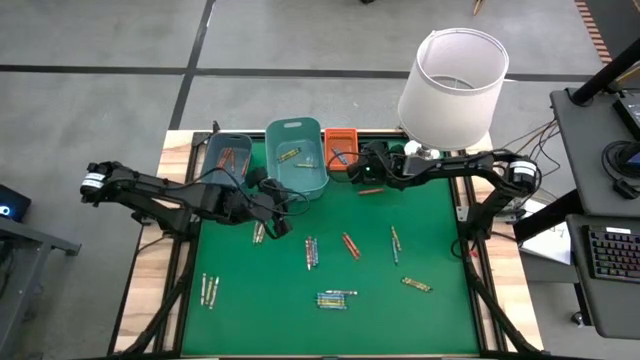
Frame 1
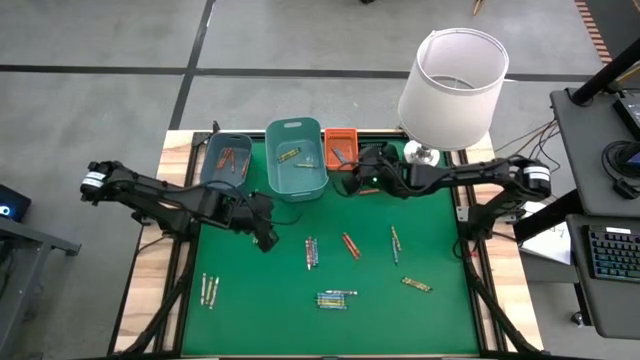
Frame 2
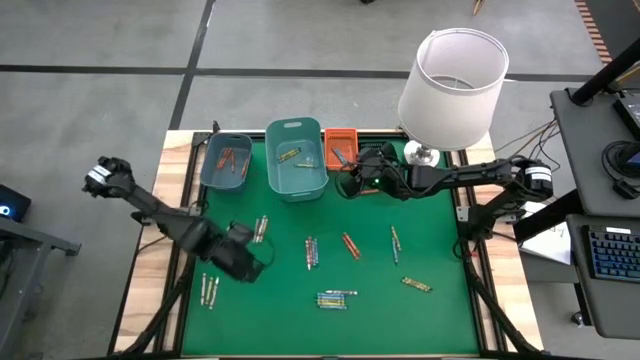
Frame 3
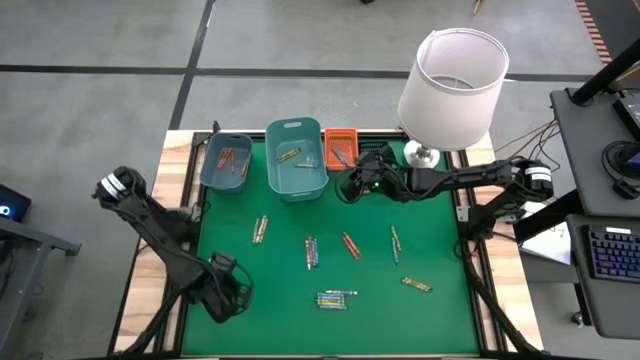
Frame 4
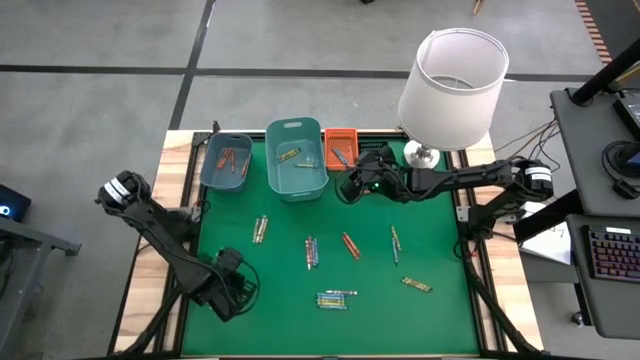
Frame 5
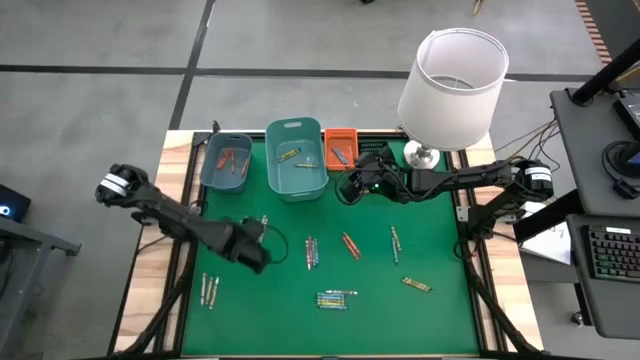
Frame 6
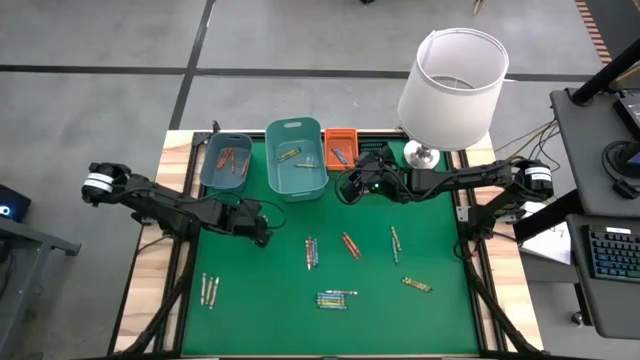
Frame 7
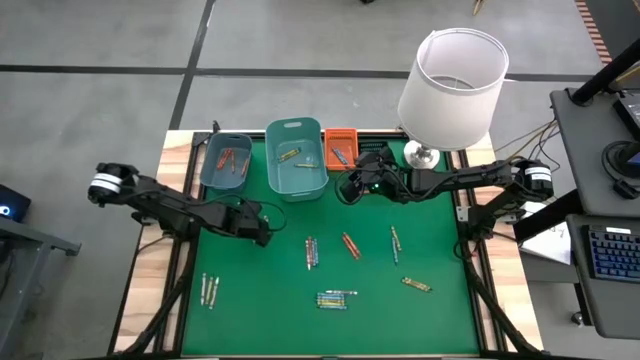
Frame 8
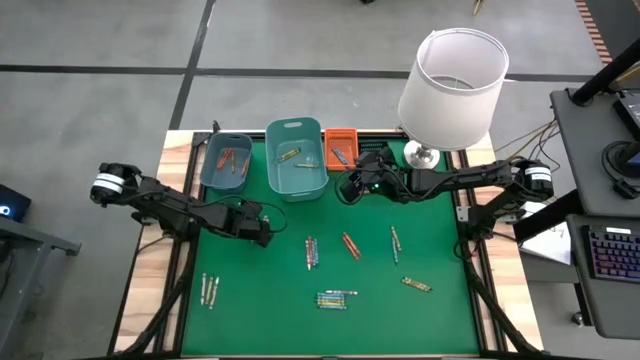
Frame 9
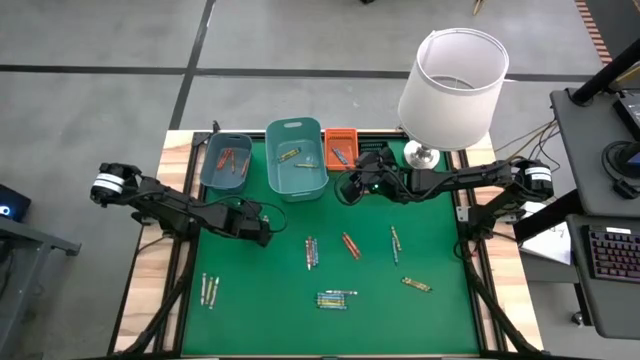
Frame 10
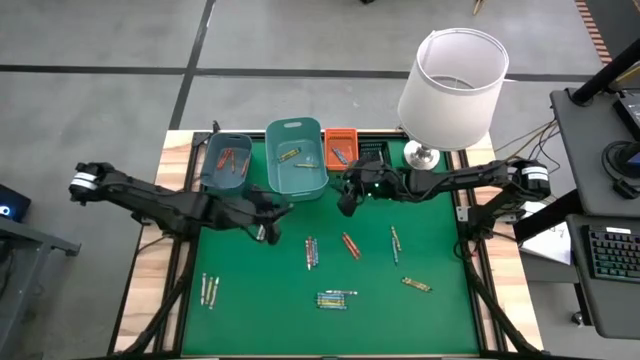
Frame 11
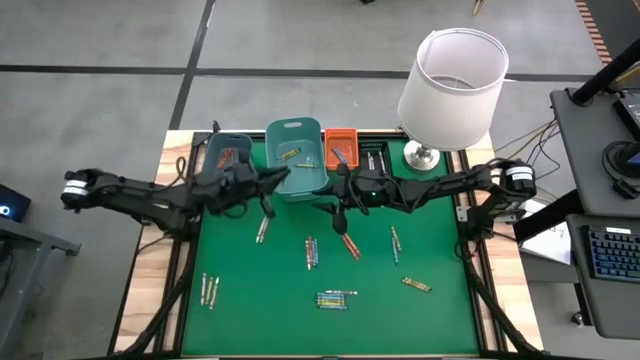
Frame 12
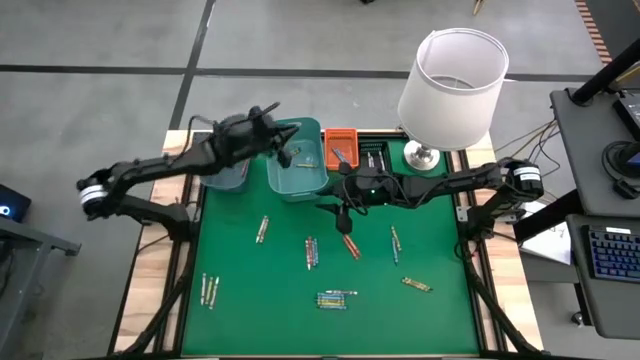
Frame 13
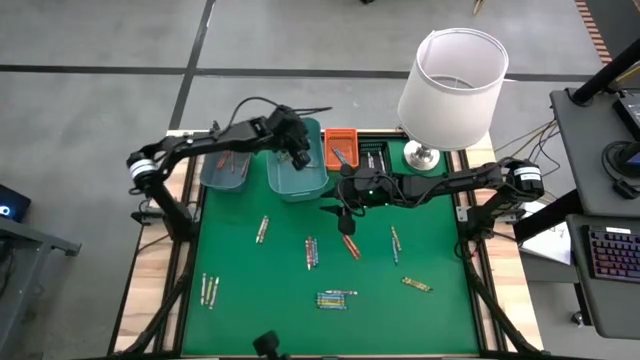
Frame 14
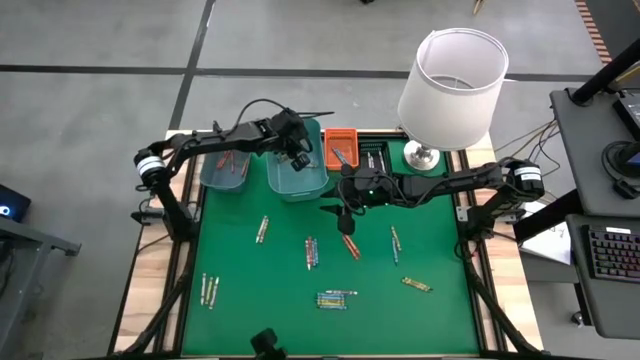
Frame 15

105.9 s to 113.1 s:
Task: Sort crayons
Put the green crayon into the green bin

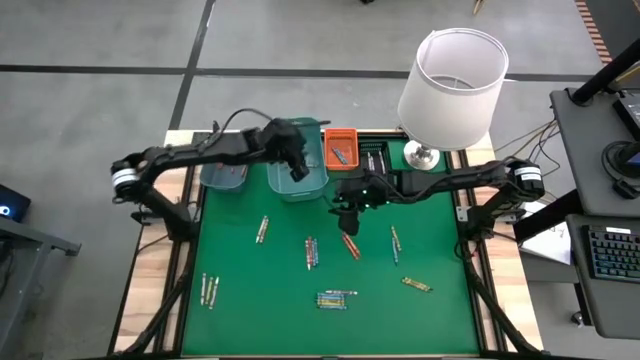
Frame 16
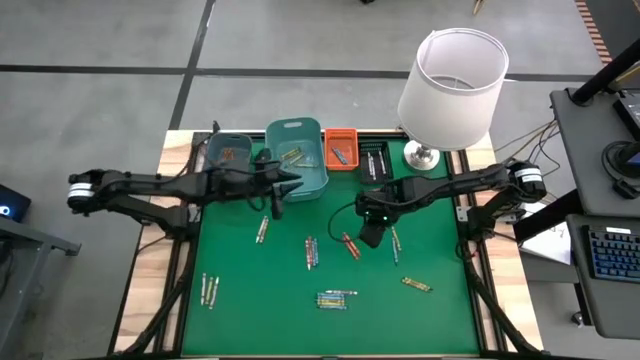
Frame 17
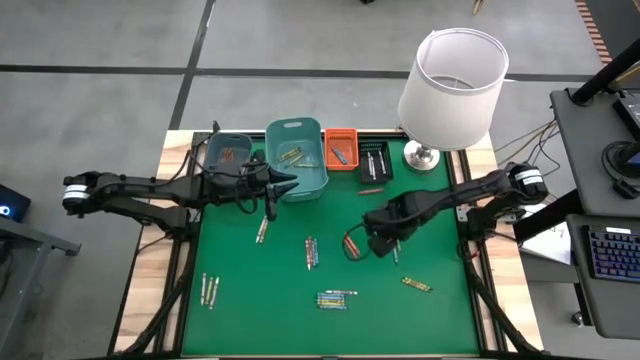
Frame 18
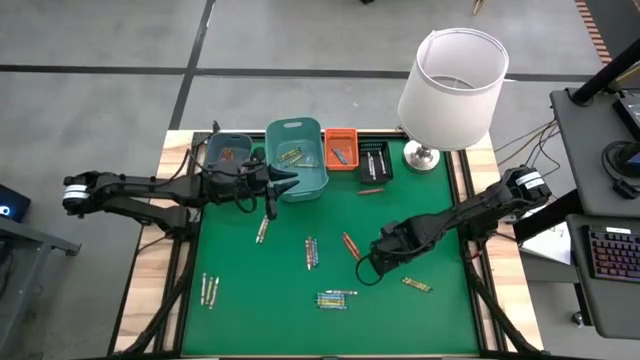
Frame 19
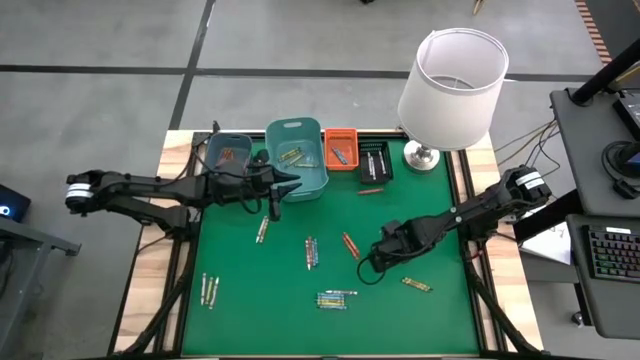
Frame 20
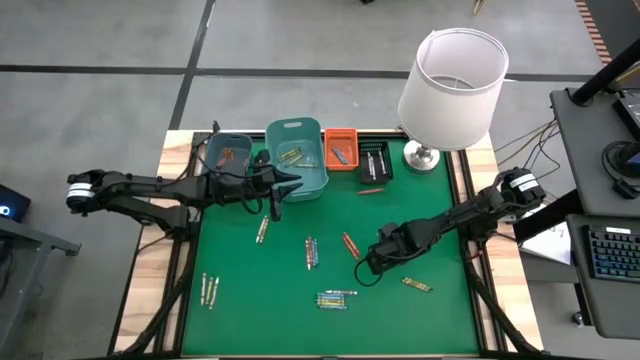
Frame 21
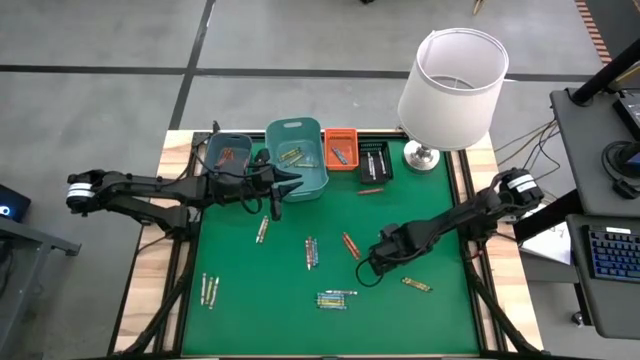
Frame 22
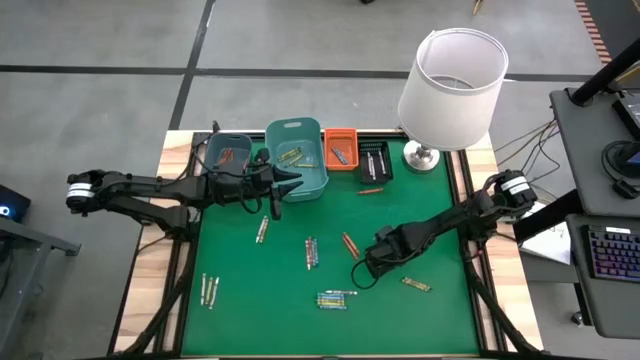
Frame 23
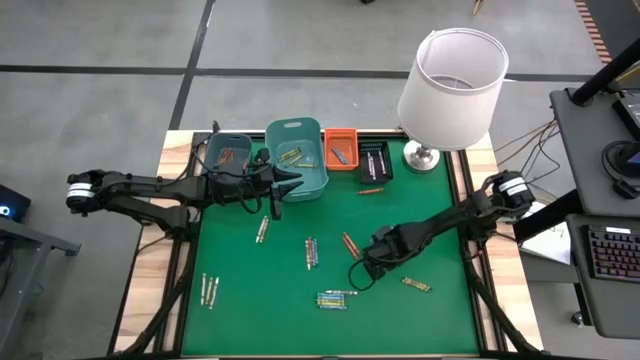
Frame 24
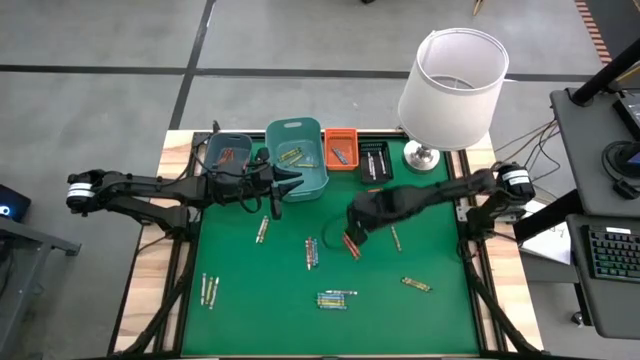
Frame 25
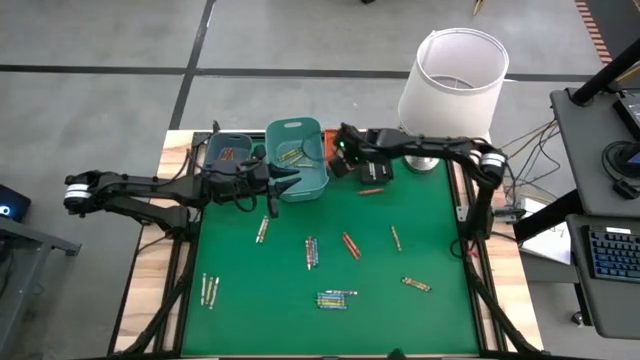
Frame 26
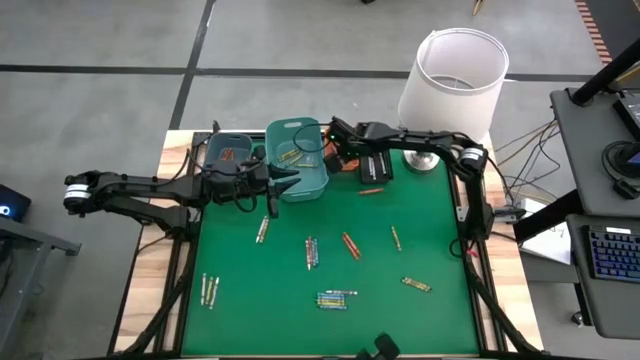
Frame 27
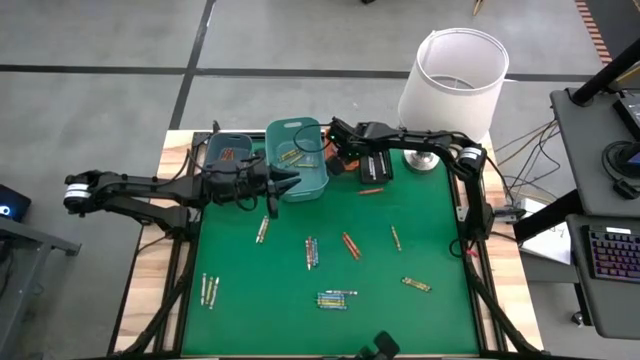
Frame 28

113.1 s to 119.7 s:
Put the blue crayon into the orange bin

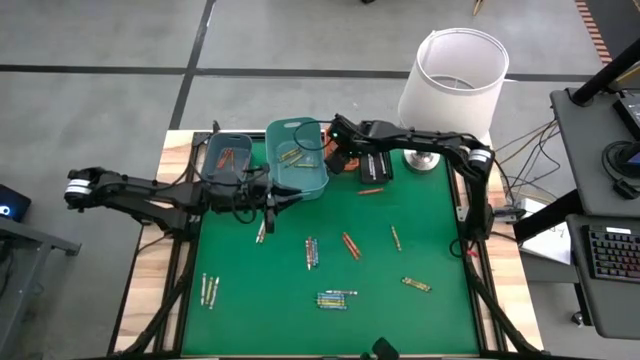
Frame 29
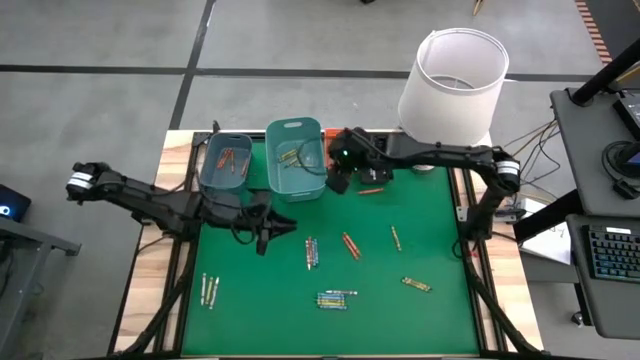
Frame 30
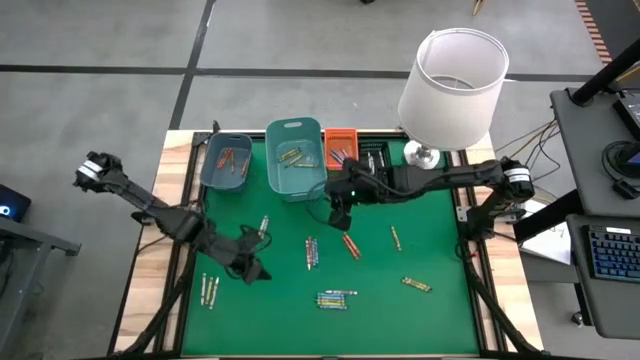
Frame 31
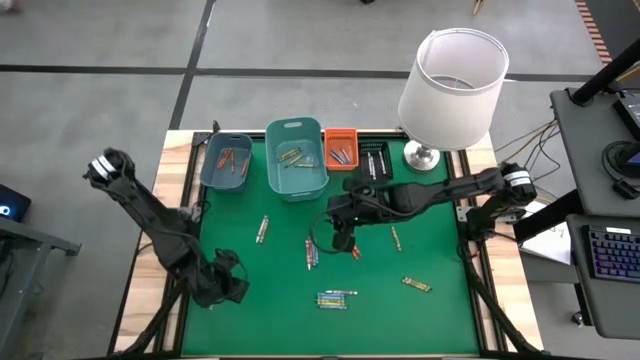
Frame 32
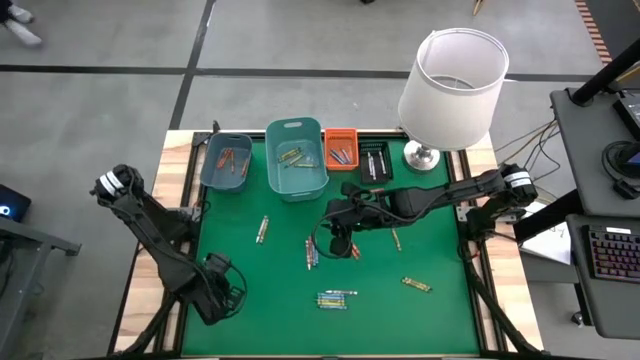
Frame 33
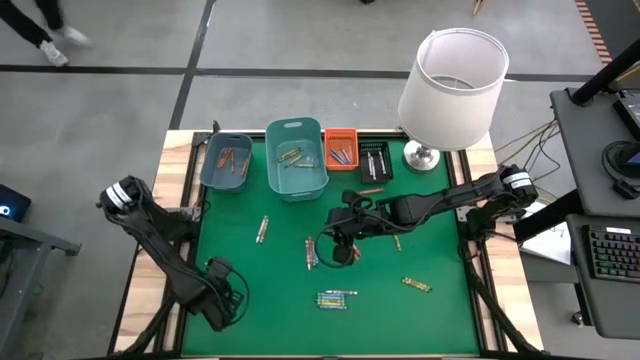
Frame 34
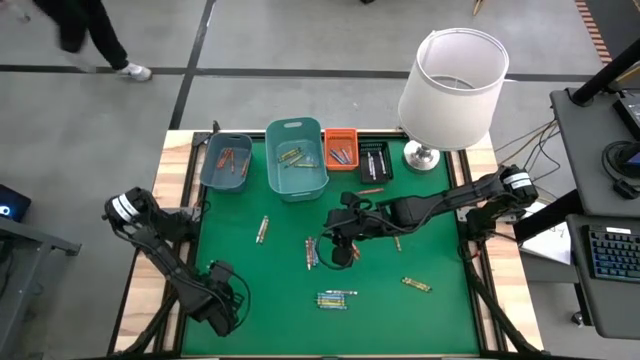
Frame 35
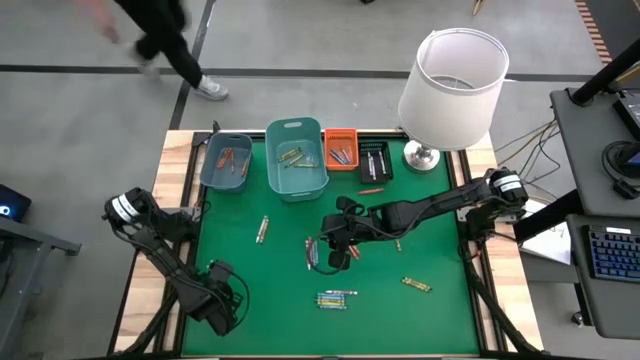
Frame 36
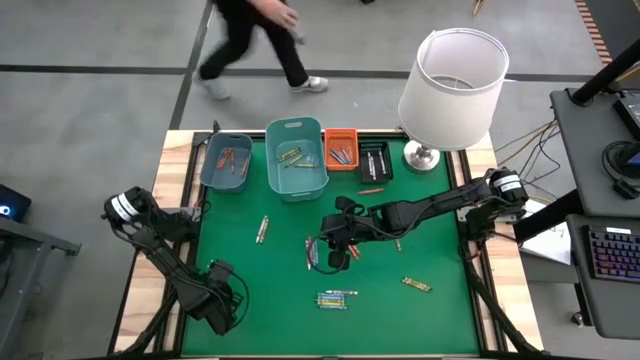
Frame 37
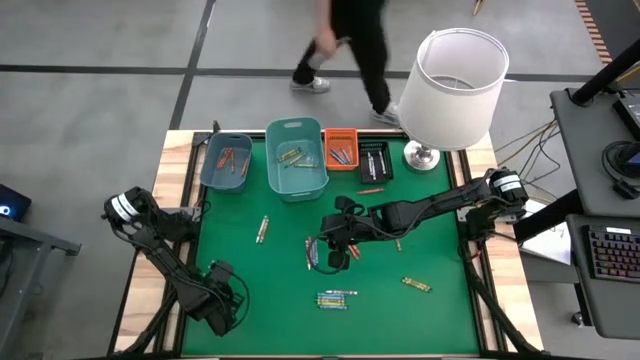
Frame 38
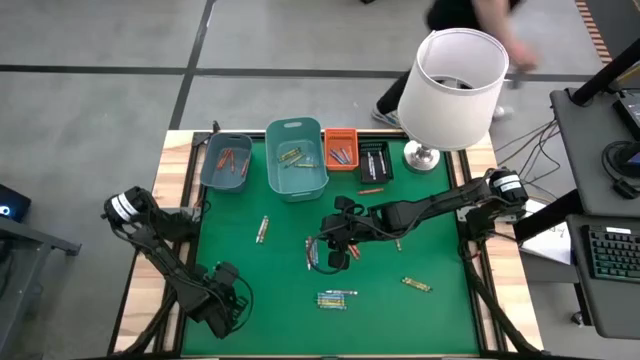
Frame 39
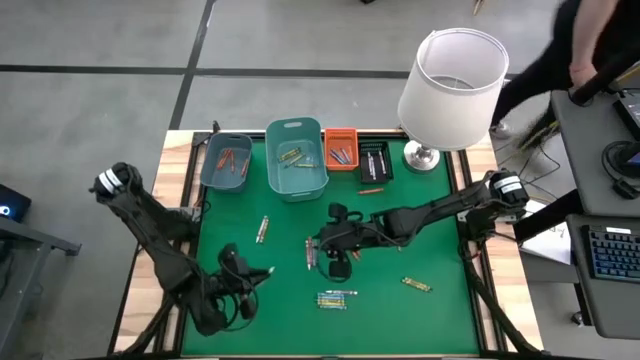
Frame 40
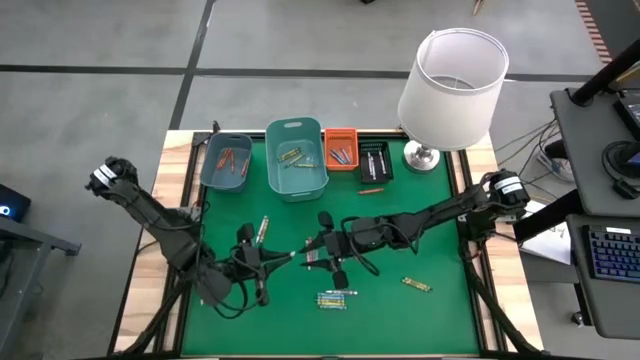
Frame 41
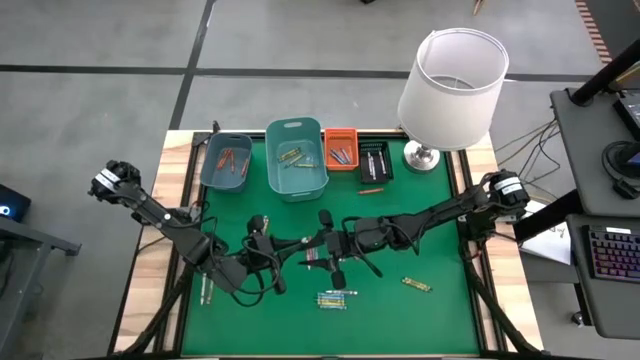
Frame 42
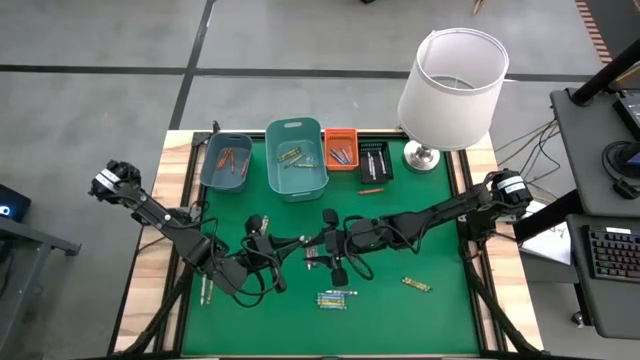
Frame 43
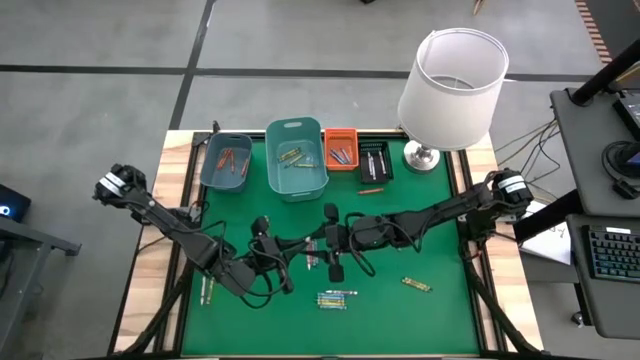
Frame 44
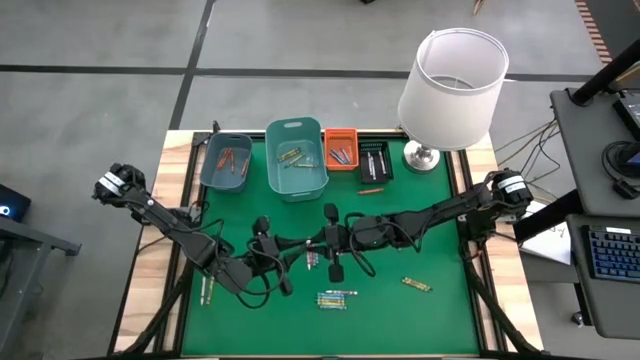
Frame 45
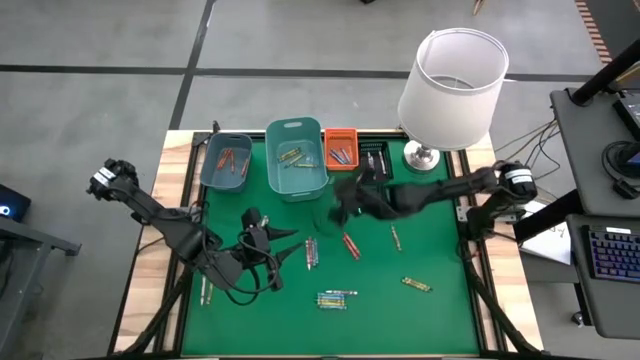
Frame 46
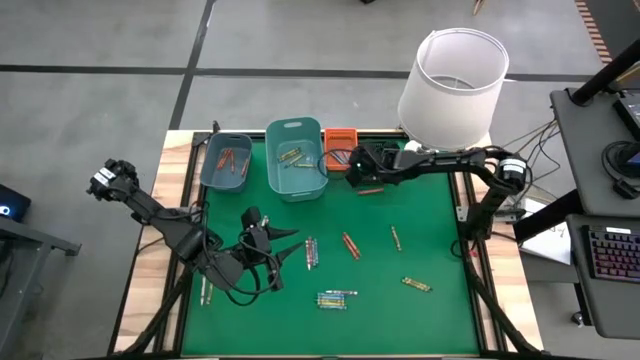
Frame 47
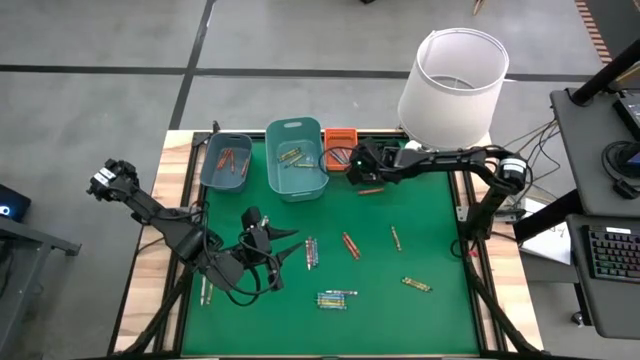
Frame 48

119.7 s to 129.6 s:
Put the white crayon into the black bin
